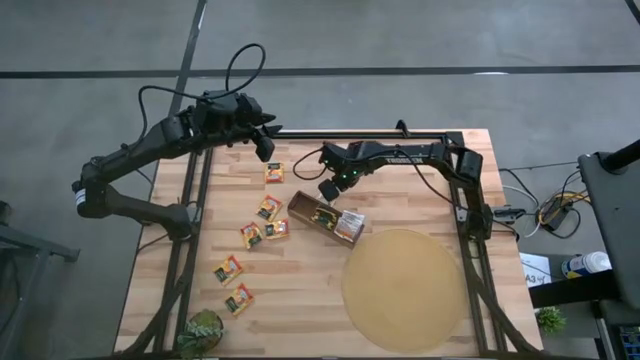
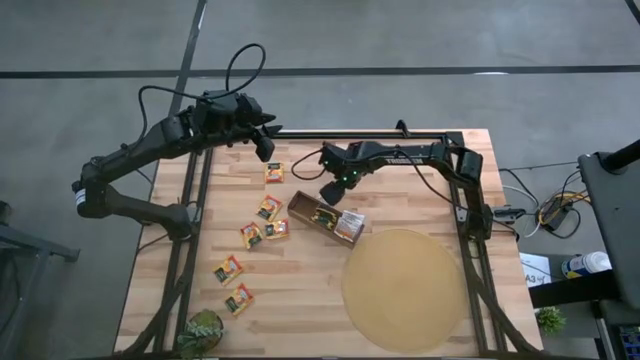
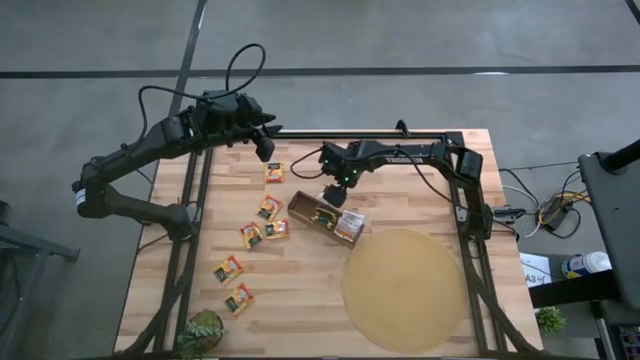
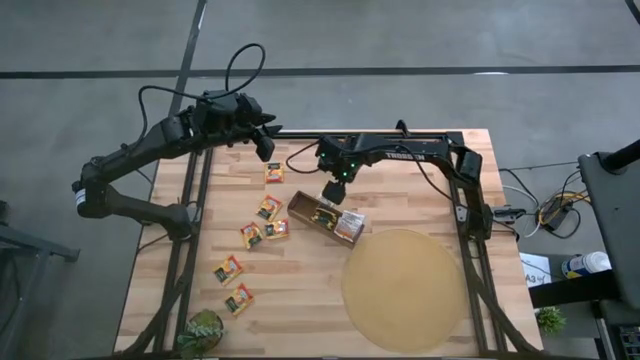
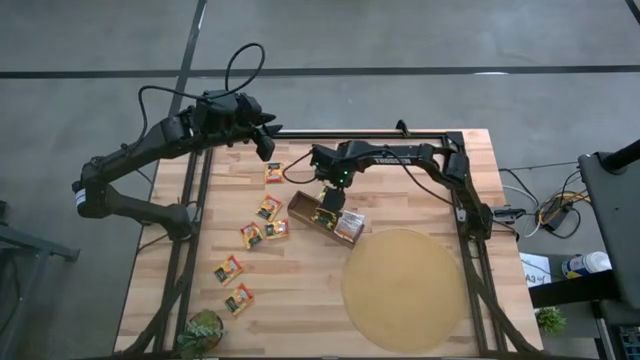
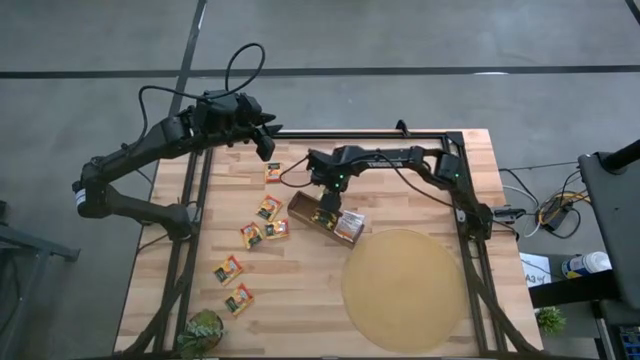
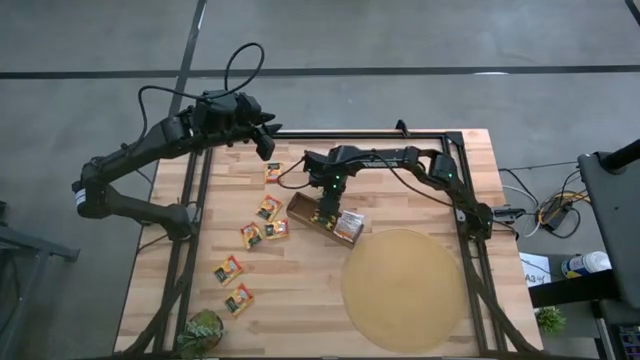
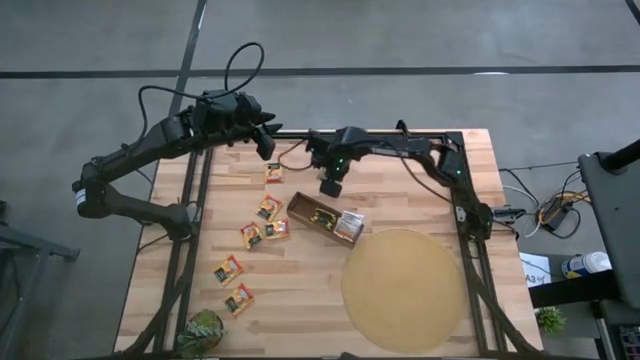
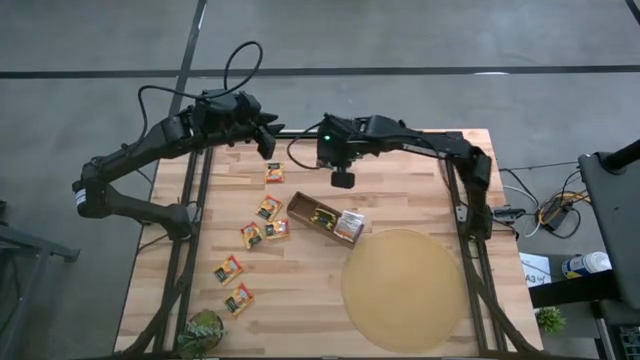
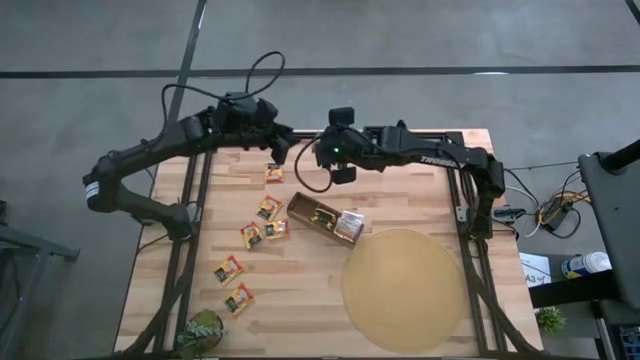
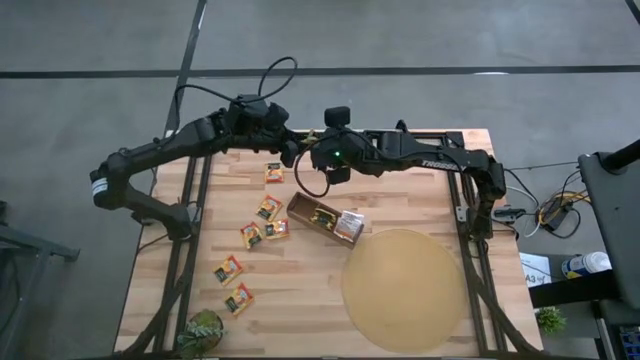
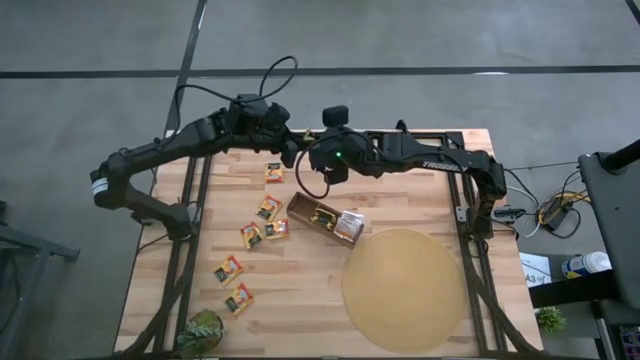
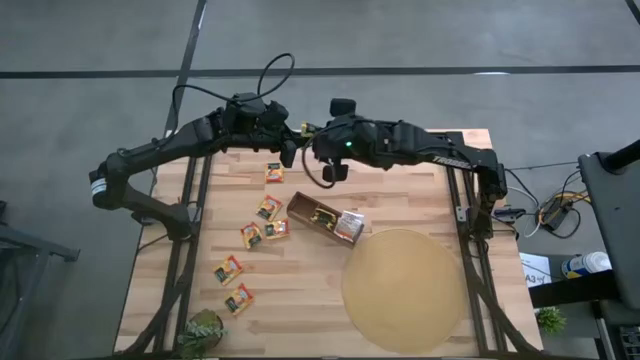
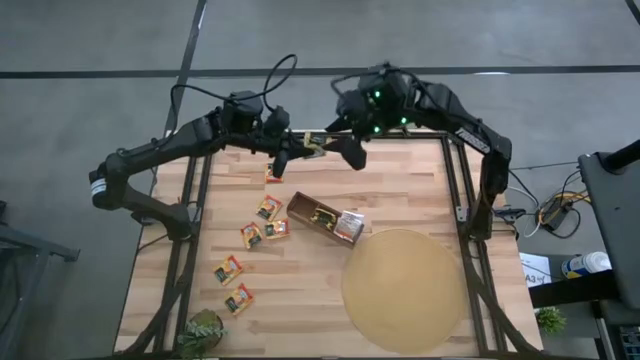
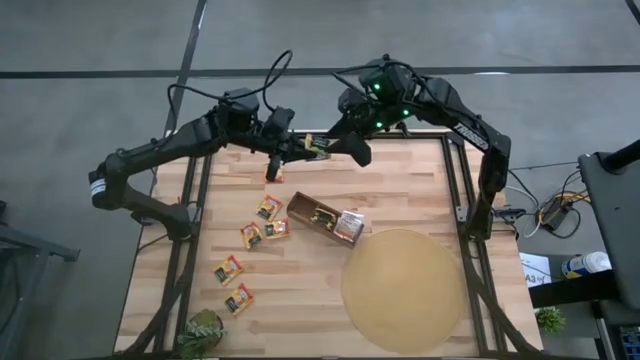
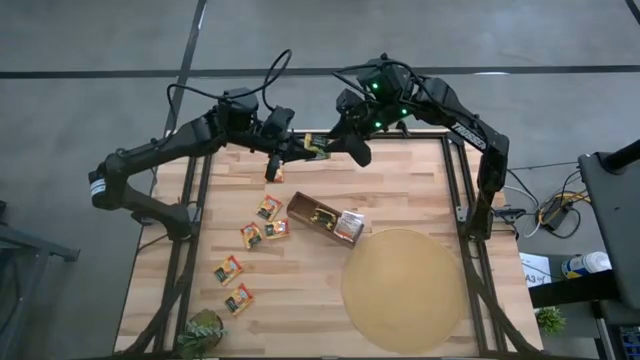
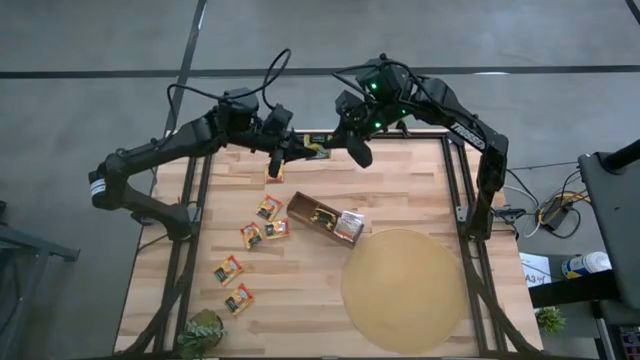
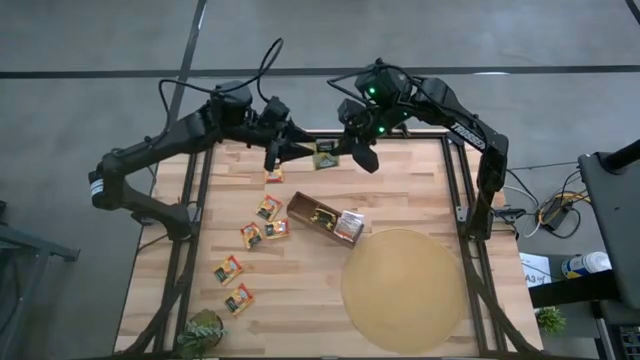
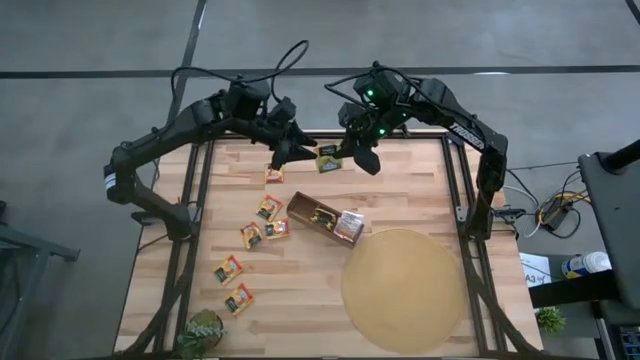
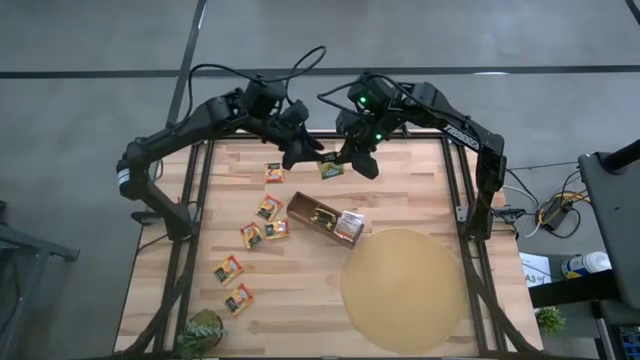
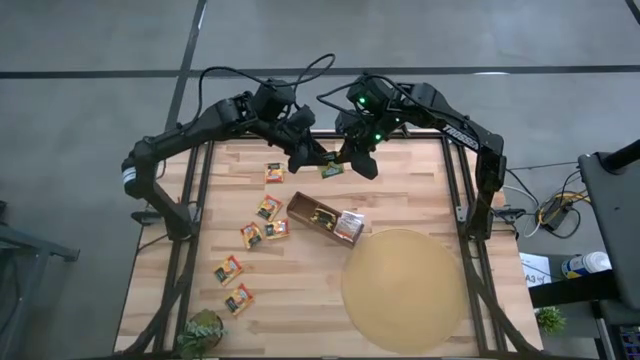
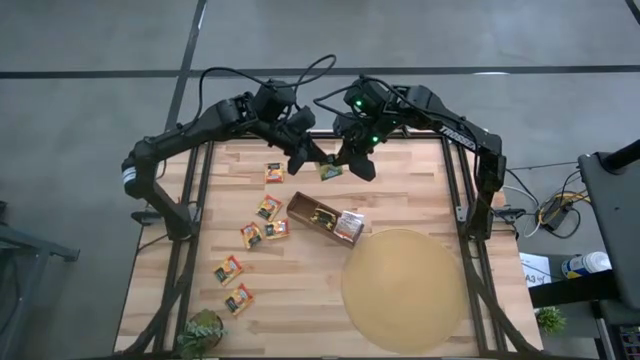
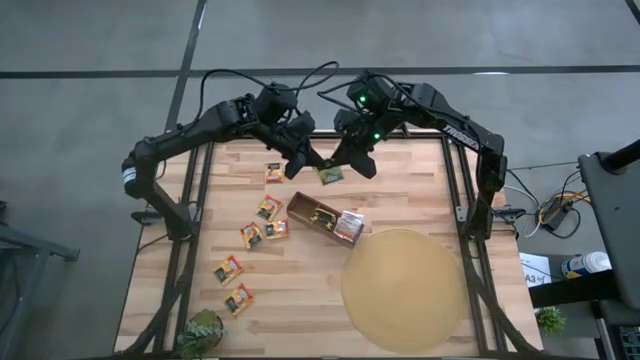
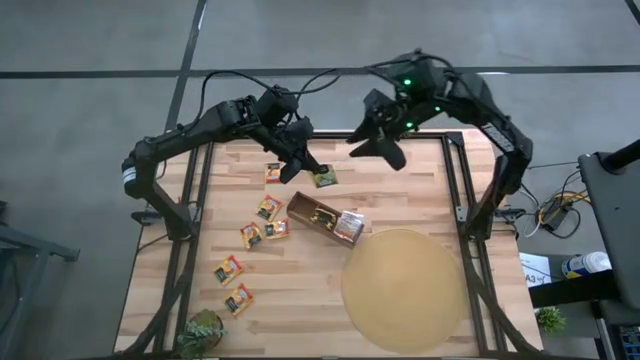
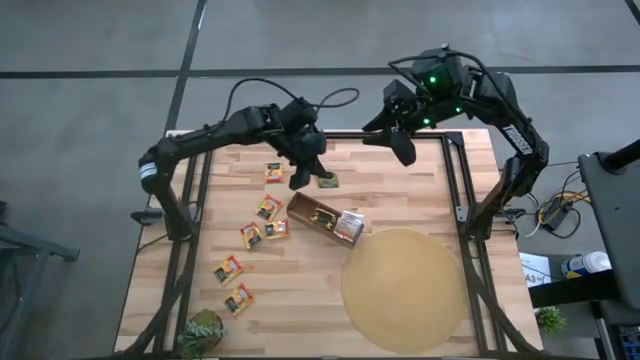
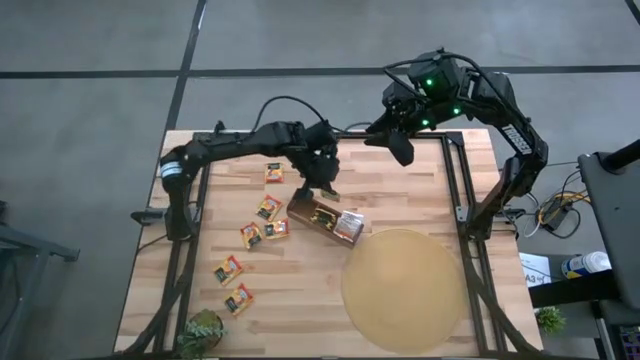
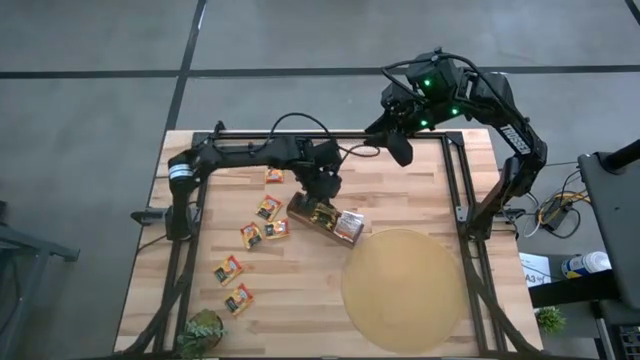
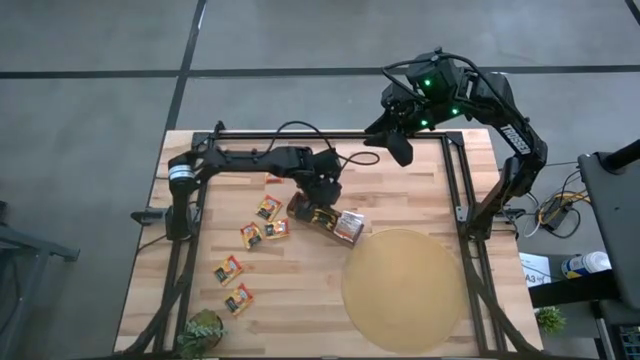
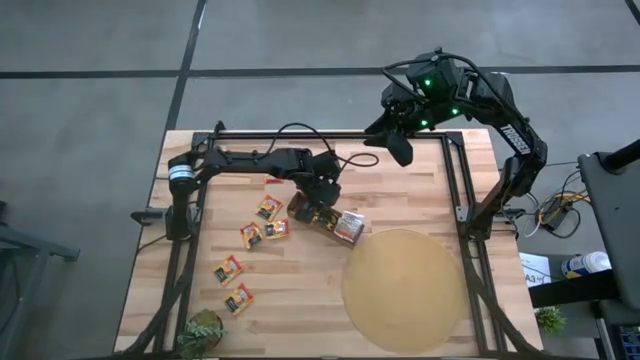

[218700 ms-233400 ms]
Task: Pick & Place Tea
Put the yellow tea bag into the middle section of the wooden organizer

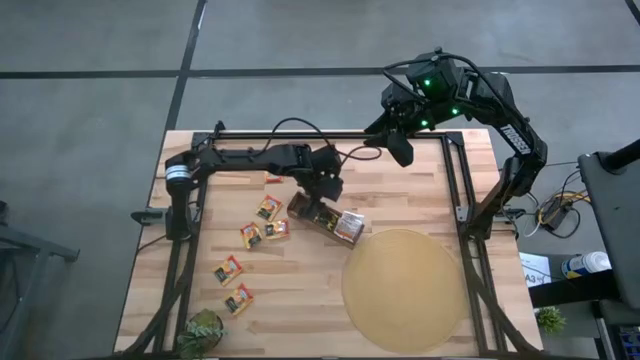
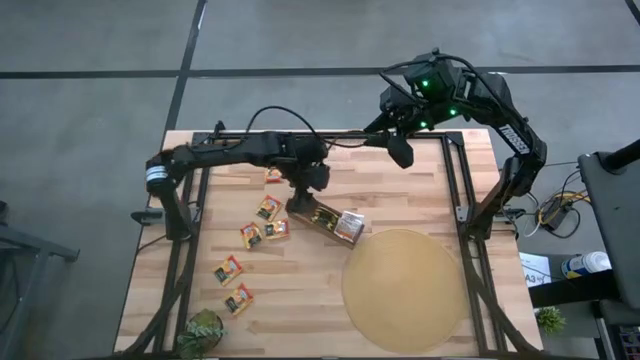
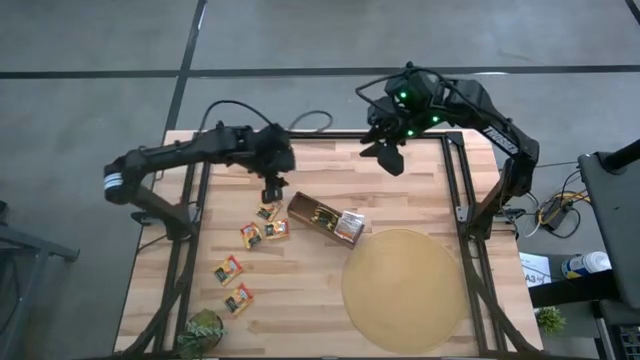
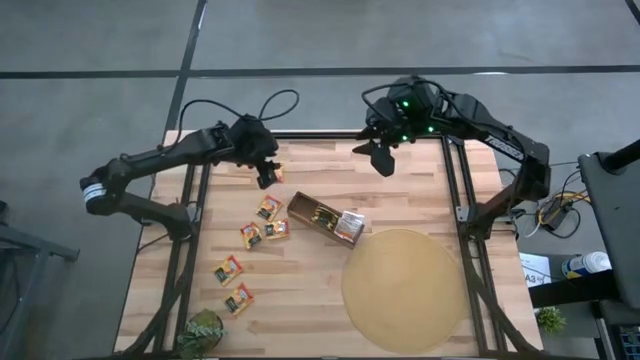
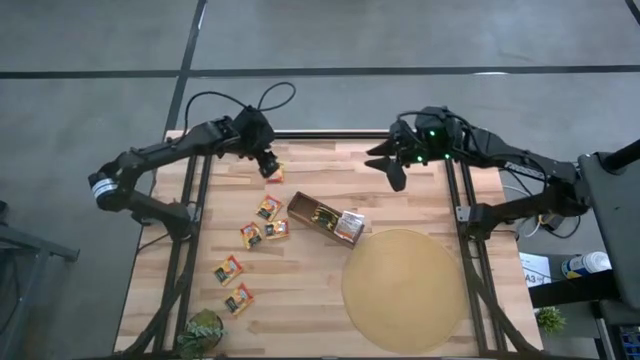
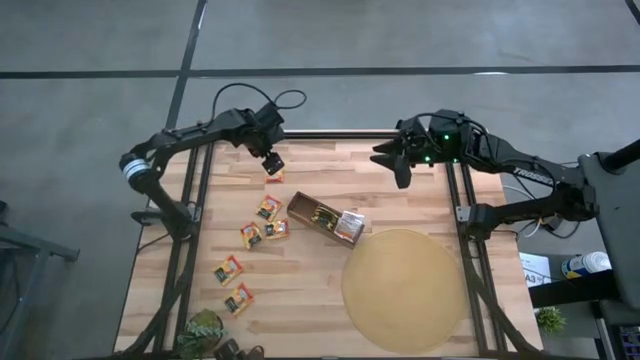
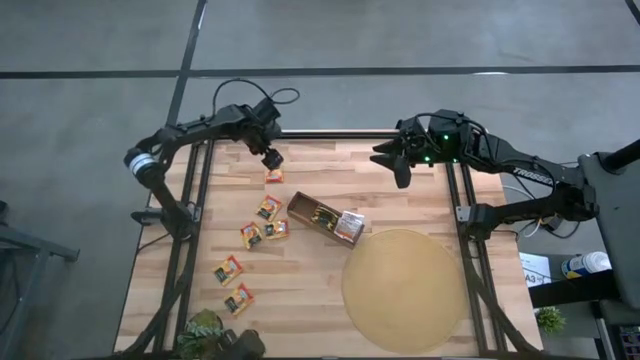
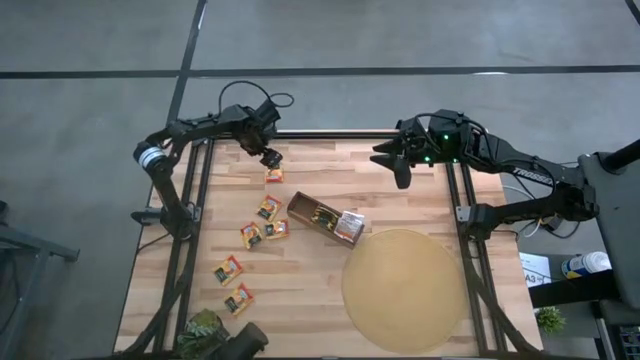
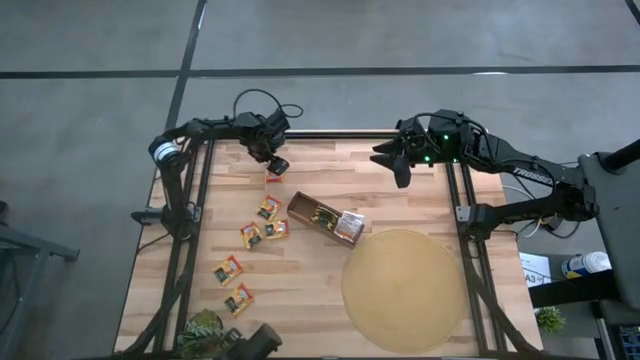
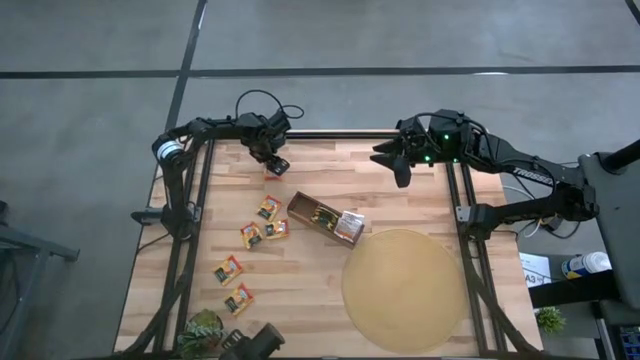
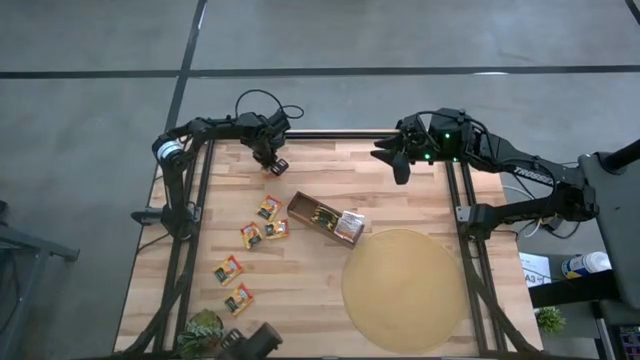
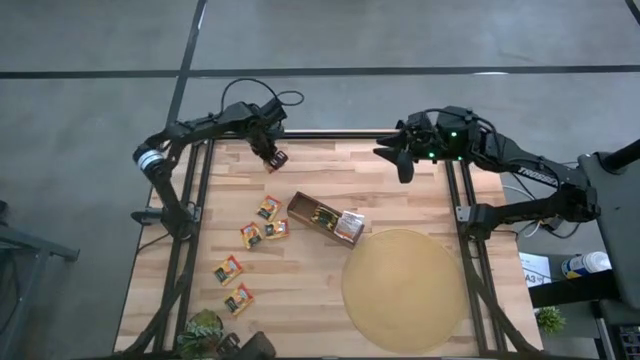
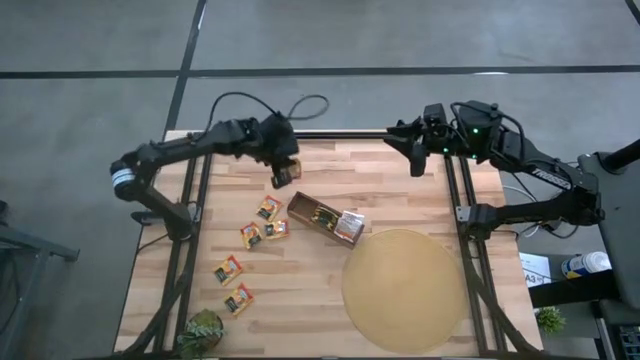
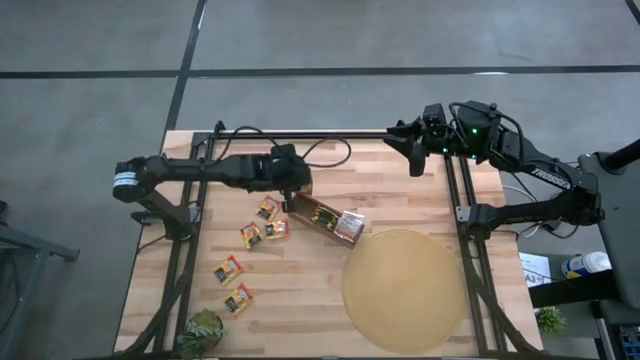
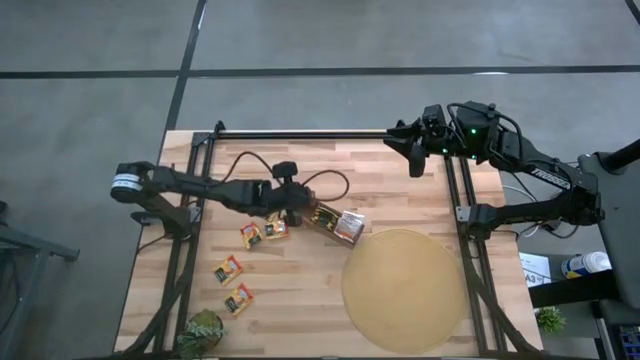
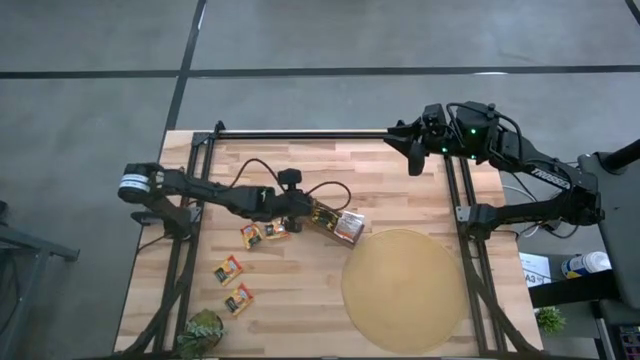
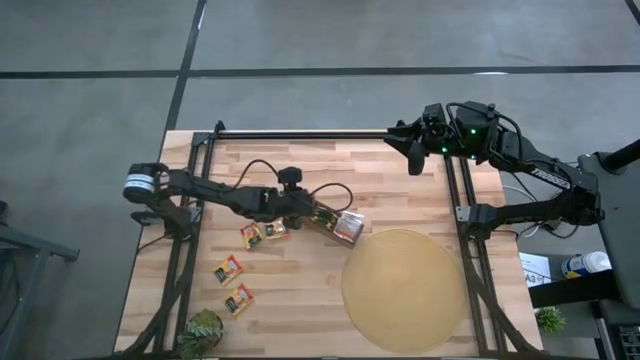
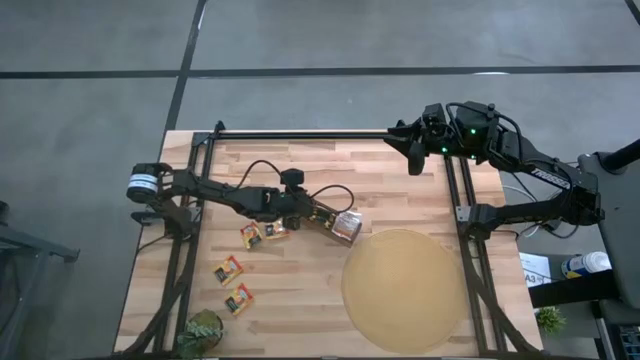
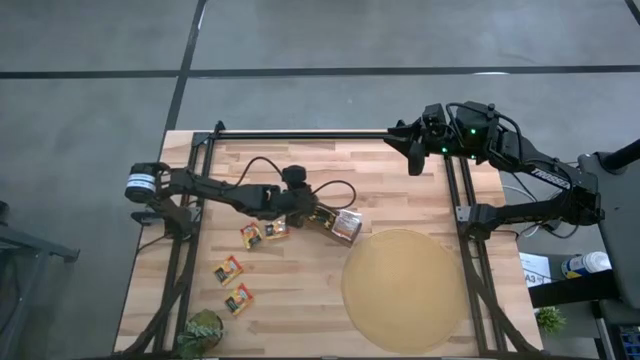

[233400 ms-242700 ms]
Put the orange tea bag into the left section of the wooden organizer
